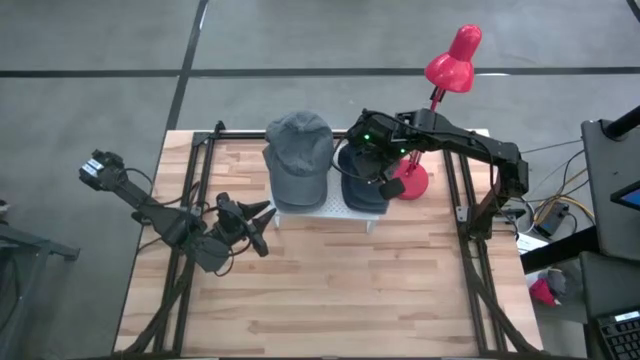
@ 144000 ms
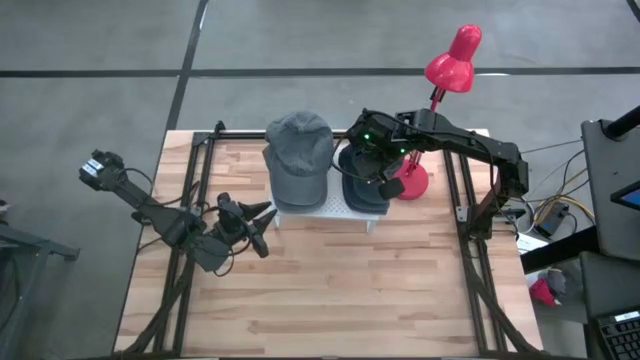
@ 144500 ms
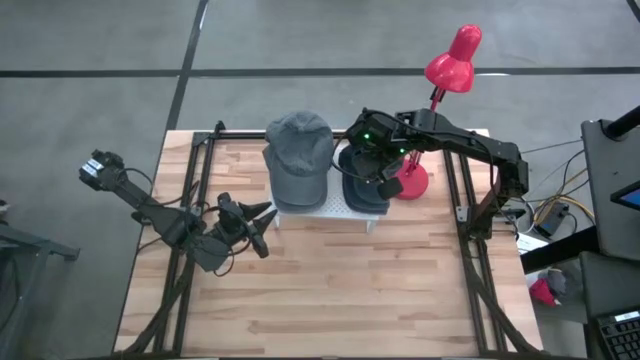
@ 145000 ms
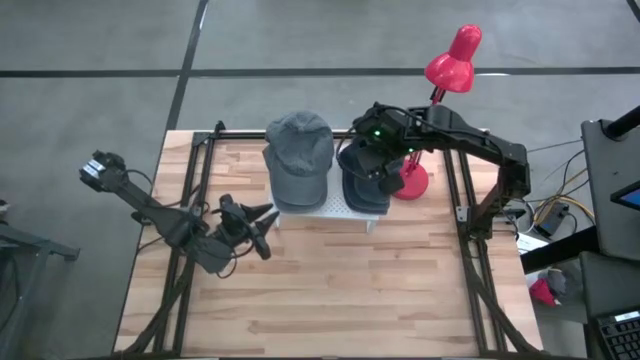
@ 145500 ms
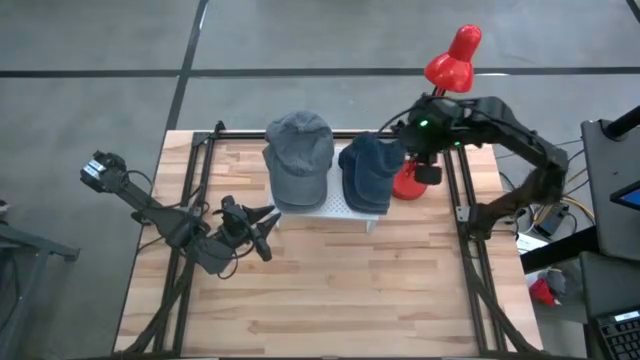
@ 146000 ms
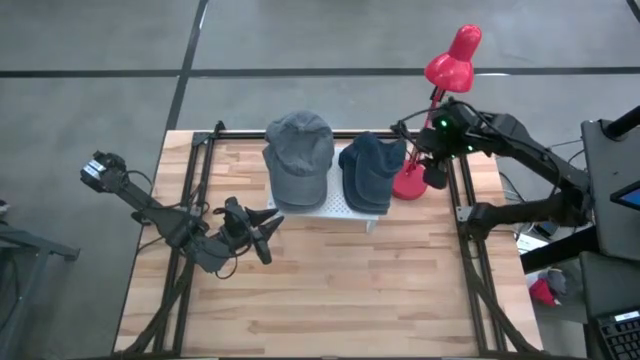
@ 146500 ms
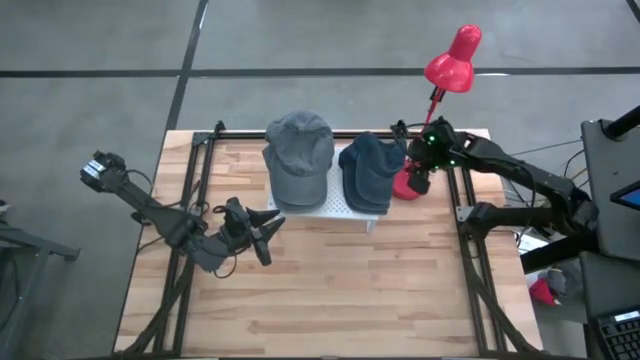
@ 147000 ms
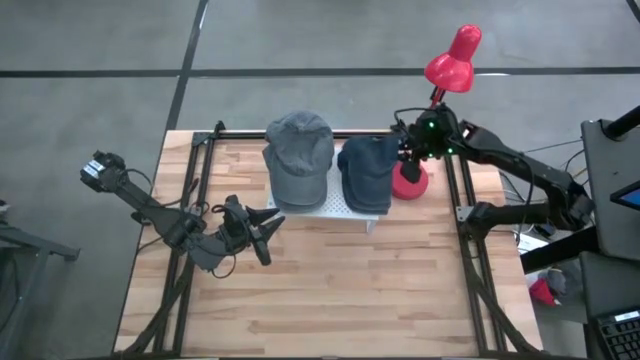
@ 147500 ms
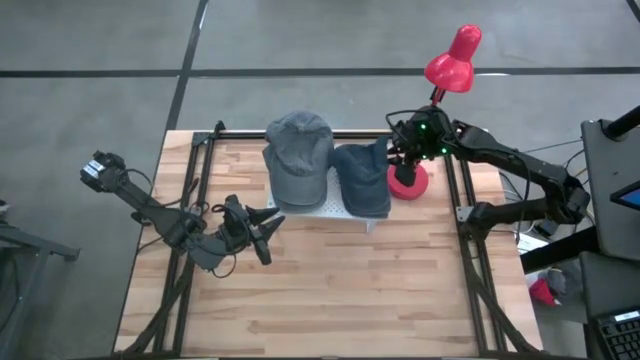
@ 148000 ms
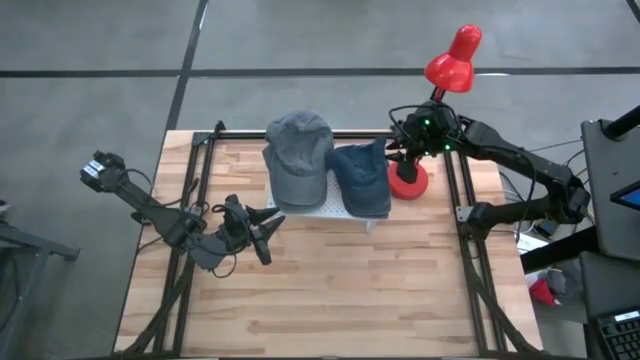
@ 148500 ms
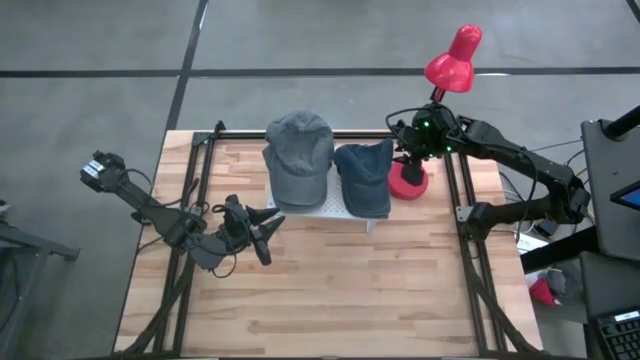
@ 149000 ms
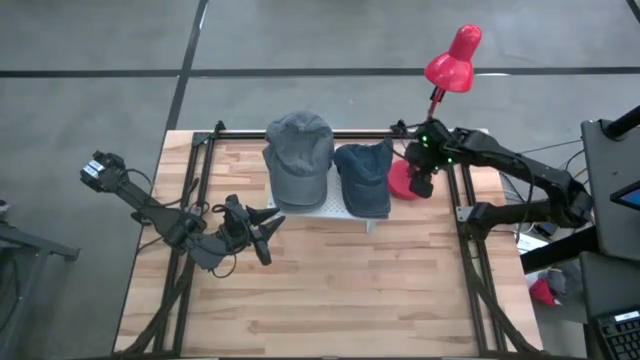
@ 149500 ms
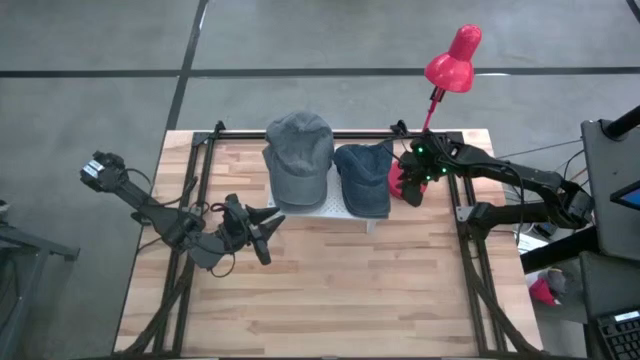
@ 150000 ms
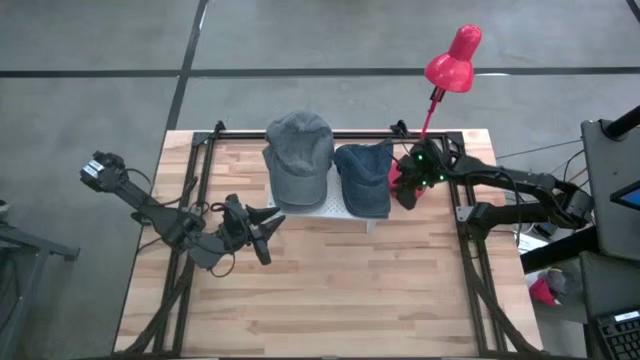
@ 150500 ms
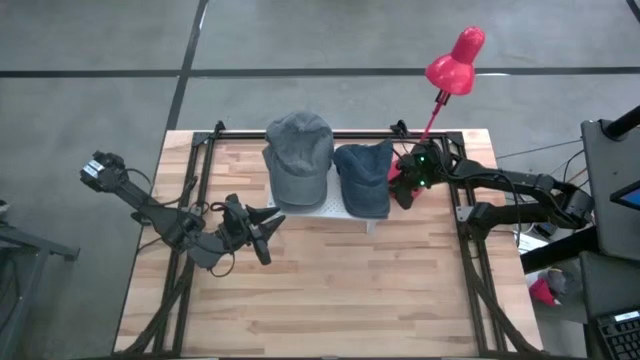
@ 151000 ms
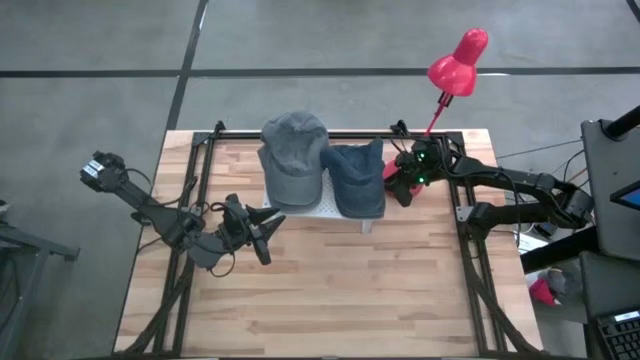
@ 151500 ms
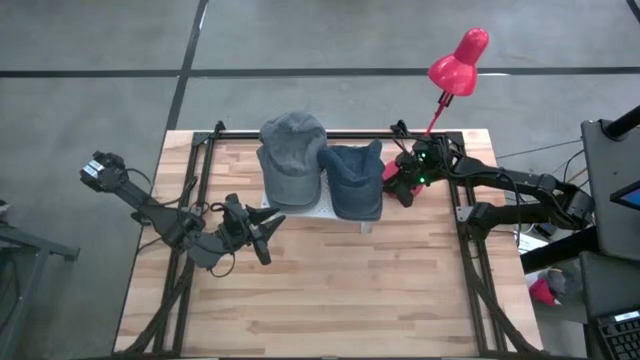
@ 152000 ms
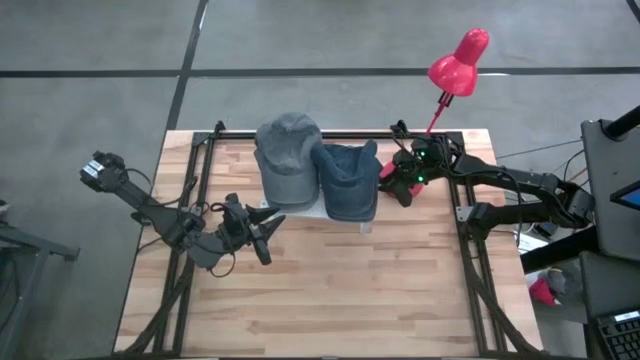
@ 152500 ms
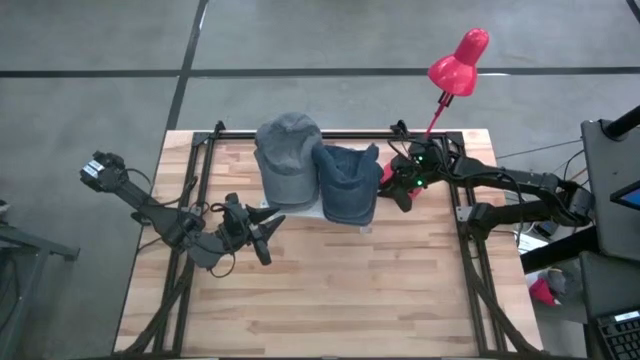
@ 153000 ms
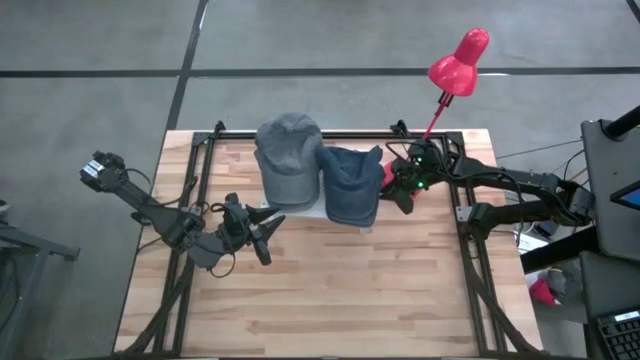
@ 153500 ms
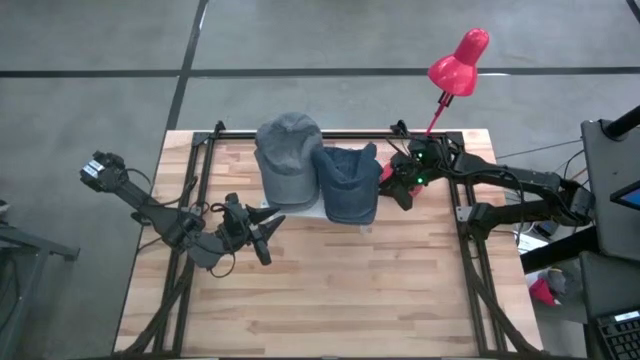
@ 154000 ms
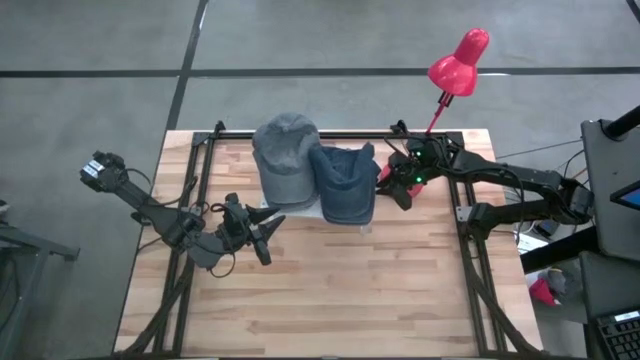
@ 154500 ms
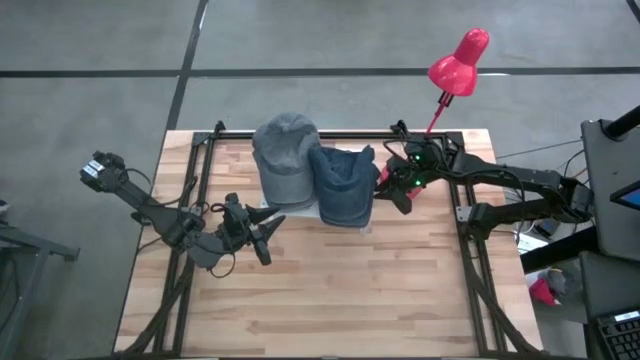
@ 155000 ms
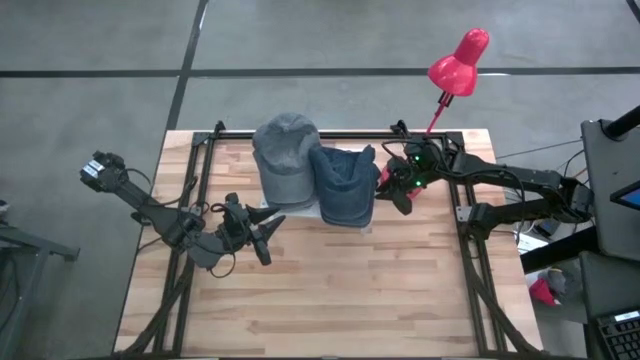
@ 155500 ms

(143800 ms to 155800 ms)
Task: Pick & Place hat
Adjust the stacked blue caps on the shelf

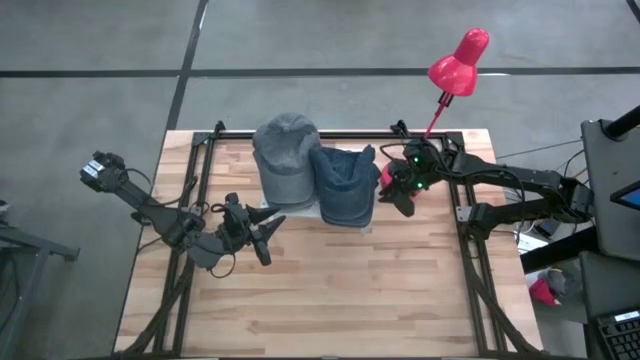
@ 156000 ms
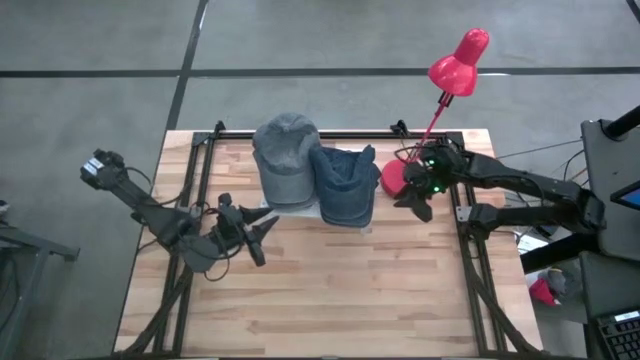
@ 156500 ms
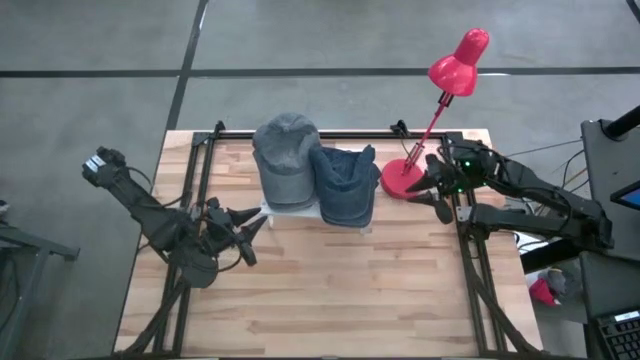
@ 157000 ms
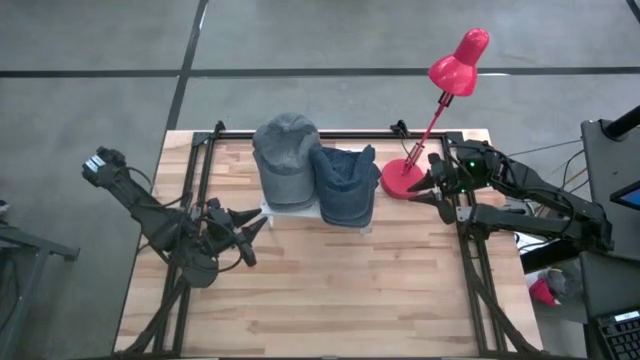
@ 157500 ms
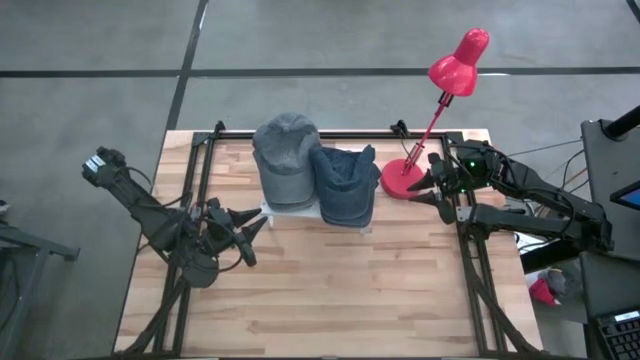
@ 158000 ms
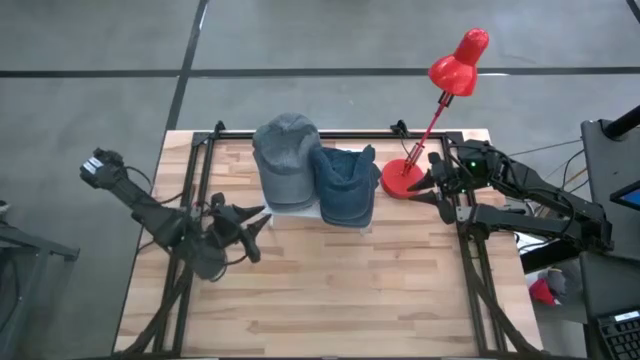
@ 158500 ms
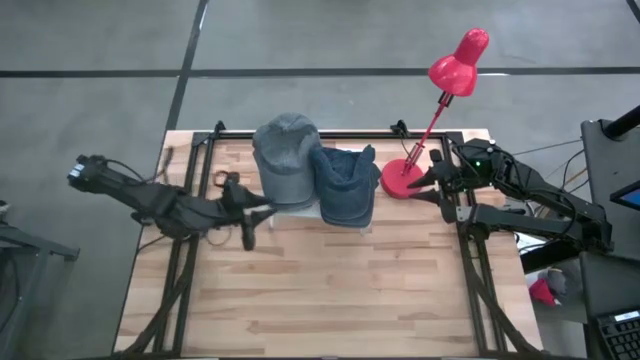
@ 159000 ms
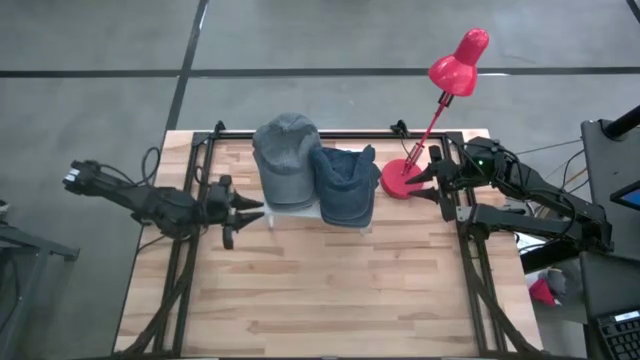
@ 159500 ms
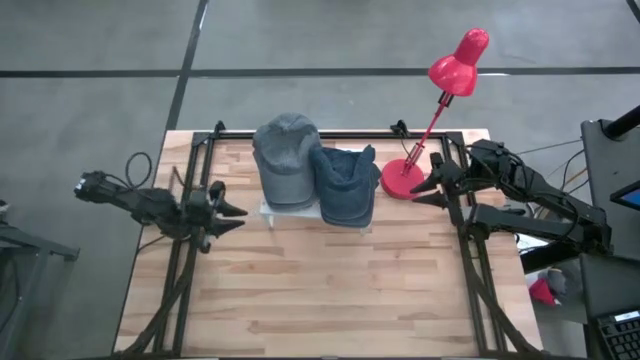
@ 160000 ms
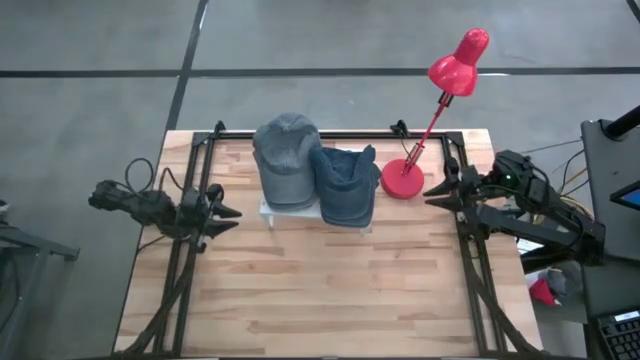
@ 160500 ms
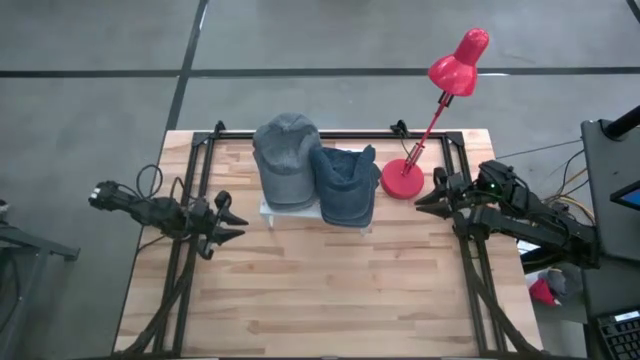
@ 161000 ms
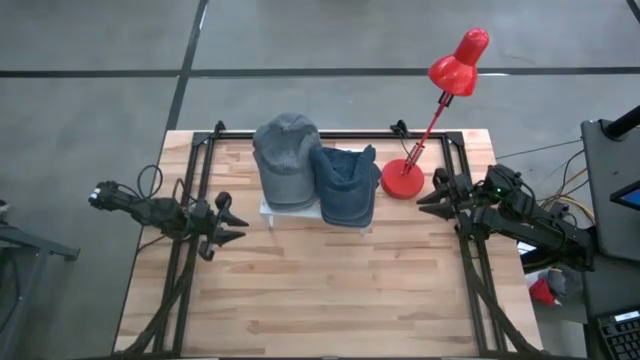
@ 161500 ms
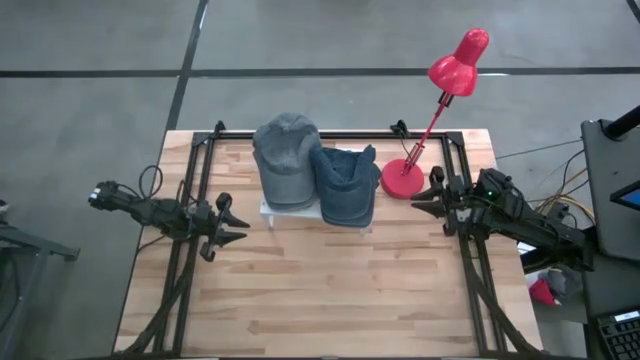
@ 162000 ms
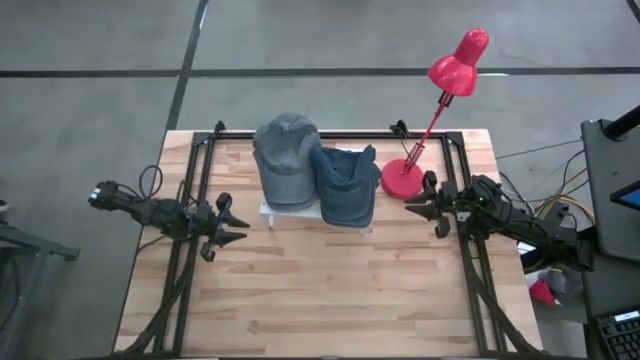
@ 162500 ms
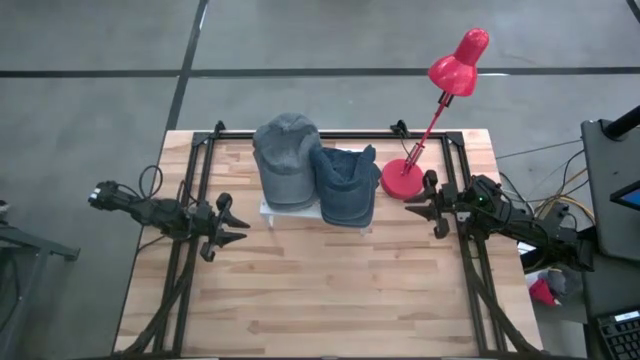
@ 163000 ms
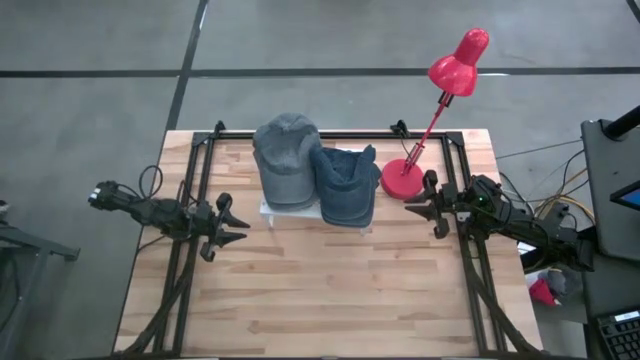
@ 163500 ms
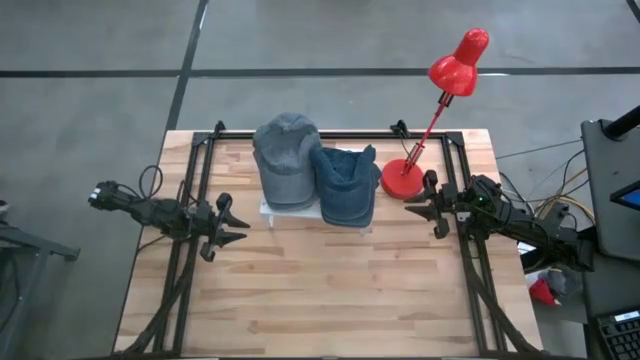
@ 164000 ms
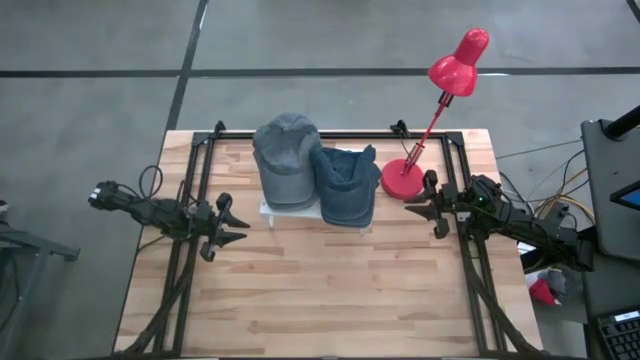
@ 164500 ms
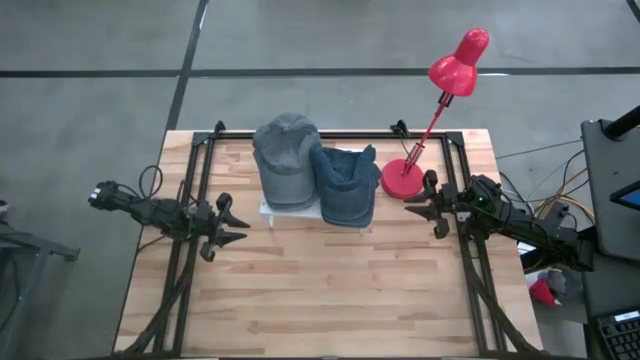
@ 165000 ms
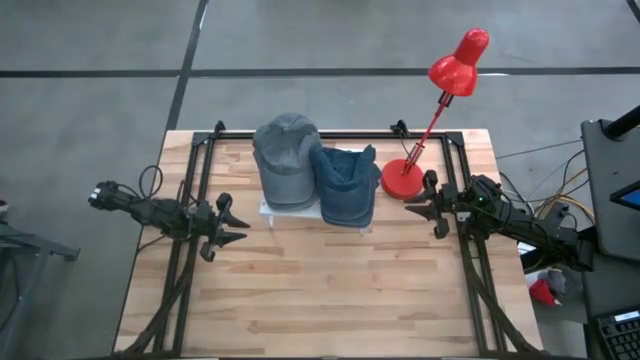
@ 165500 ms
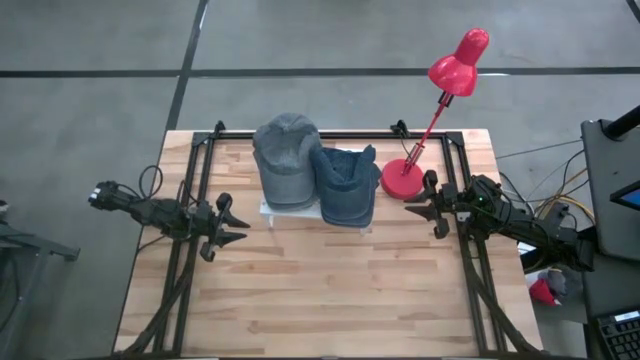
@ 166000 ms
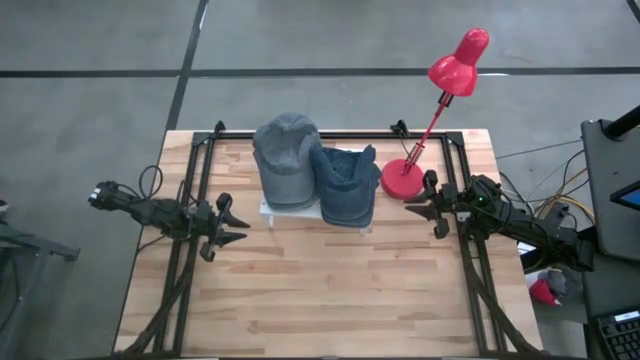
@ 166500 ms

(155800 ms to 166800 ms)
Return to Home Position
